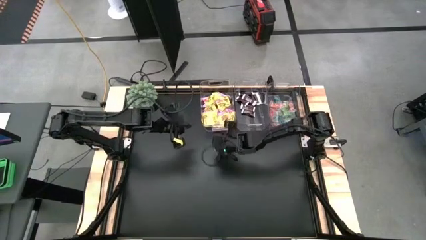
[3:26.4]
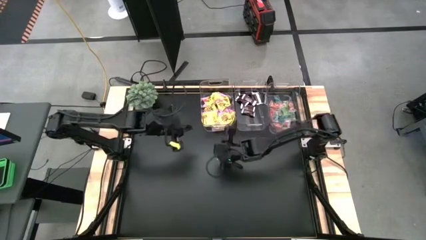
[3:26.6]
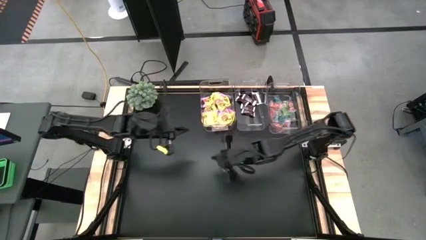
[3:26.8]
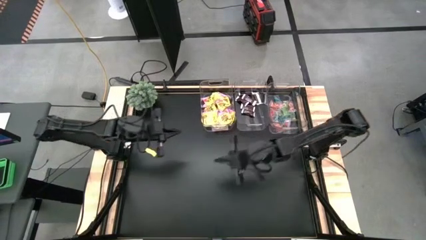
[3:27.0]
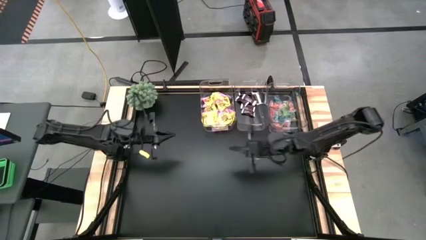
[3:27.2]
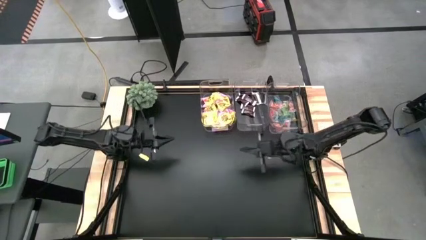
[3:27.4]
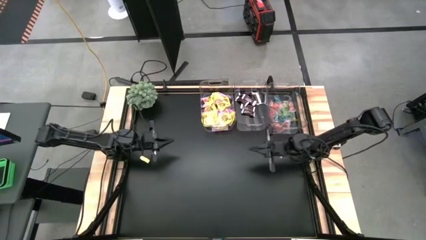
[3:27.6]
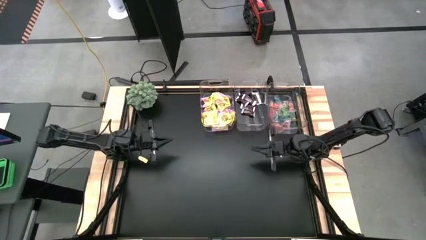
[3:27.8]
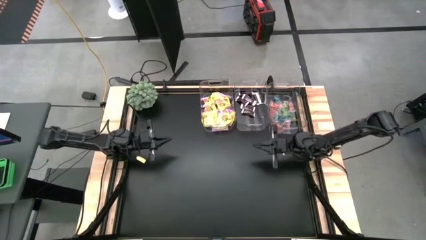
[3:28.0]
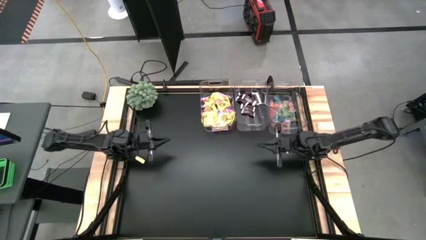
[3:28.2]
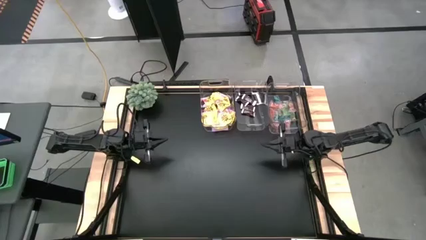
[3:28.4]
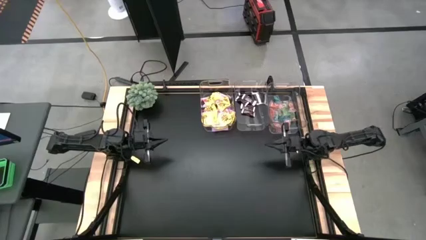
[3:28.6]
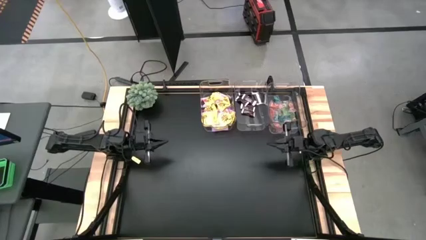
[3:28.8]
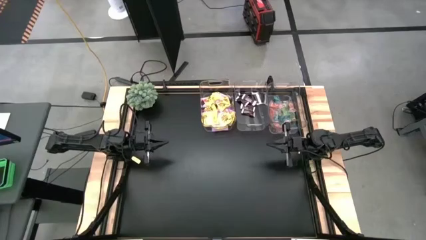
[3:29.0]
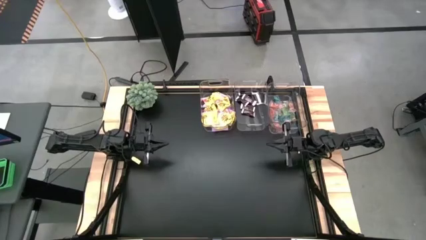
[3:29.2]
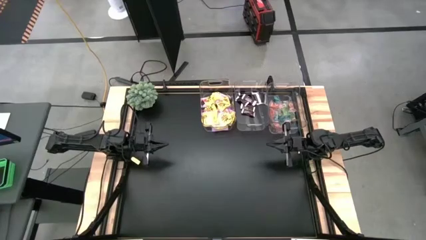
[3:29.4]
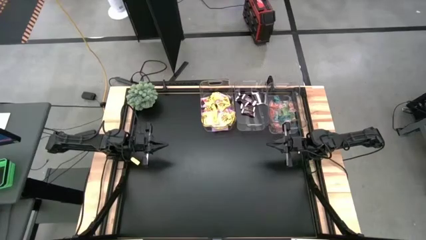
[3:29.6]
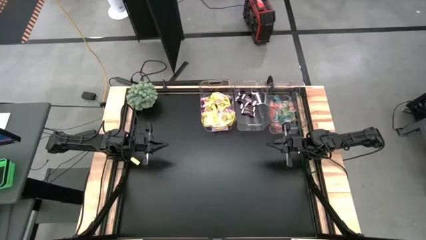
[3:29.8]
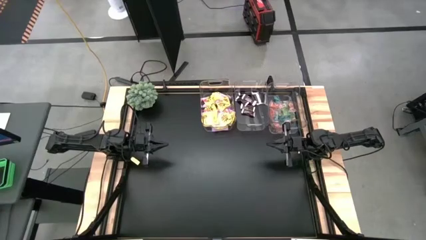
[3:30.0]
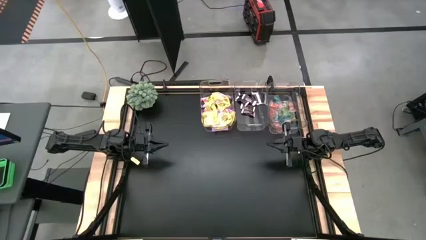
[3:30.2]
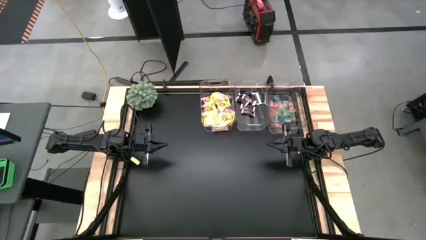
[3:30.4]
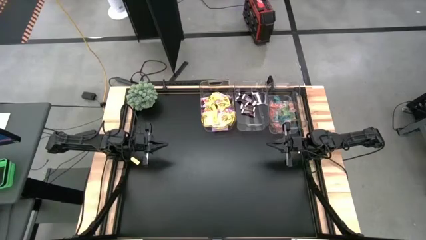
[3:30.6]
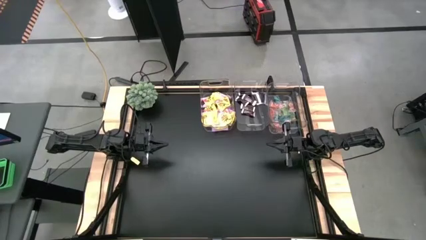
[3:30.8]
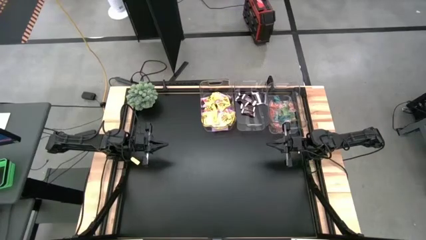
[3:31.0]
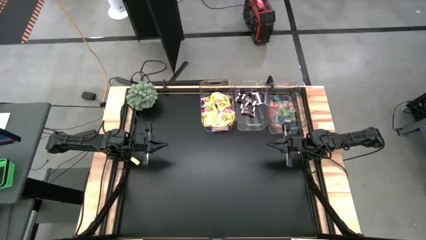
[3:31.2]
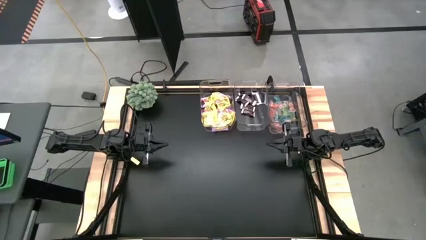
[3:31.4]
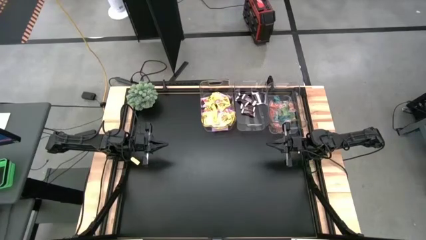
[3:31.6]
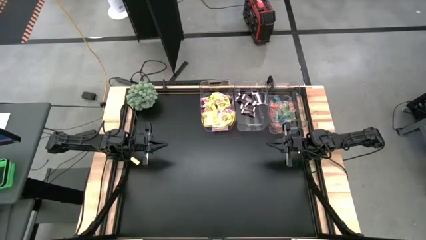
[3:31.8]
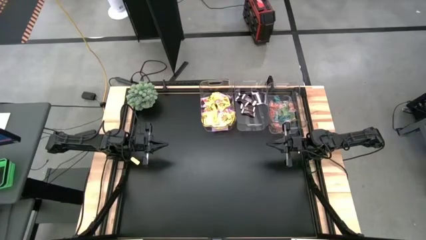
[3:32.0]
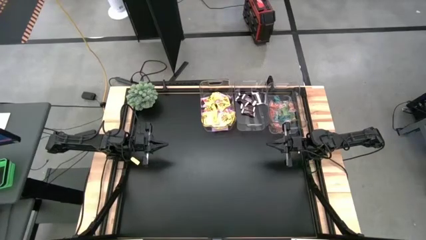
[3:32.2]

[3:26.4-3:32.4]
Task: Sort candy
Return to Home Position

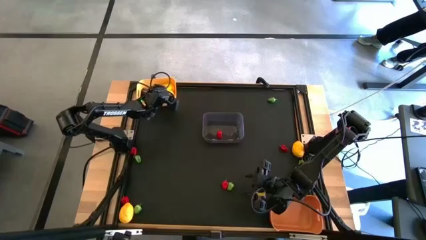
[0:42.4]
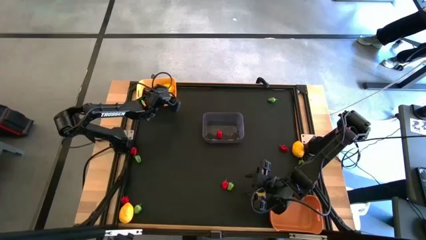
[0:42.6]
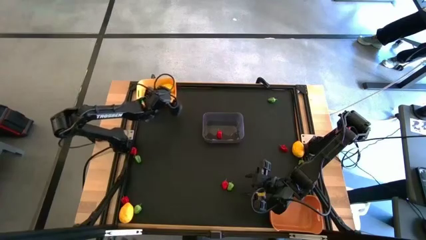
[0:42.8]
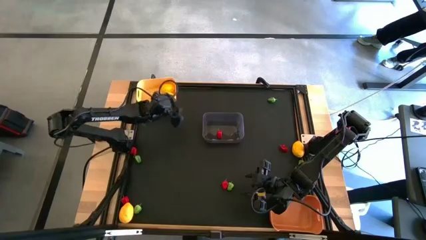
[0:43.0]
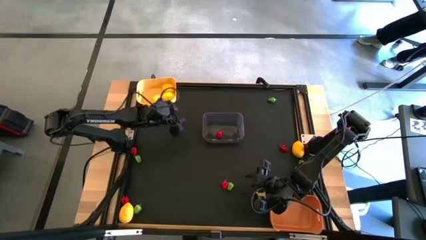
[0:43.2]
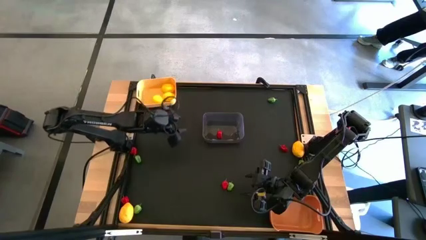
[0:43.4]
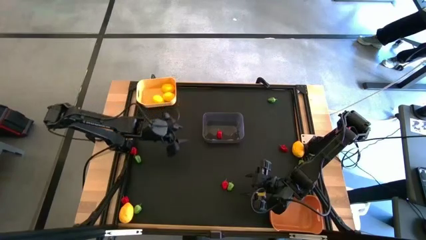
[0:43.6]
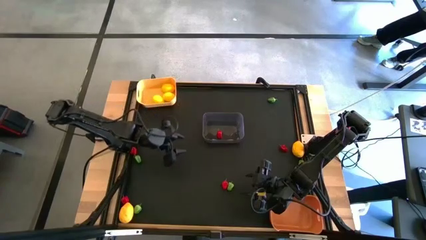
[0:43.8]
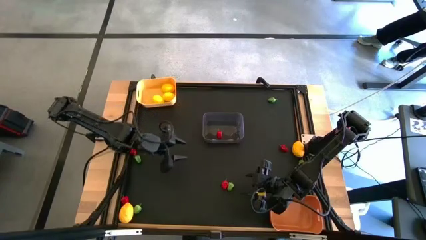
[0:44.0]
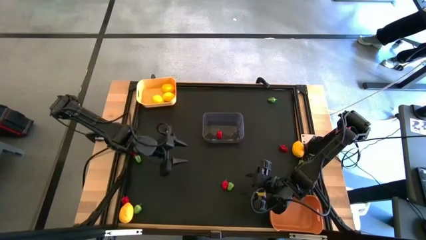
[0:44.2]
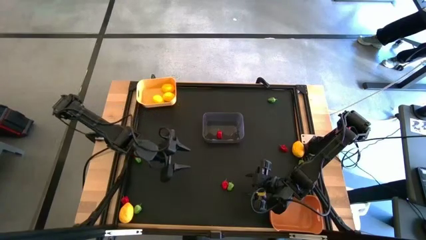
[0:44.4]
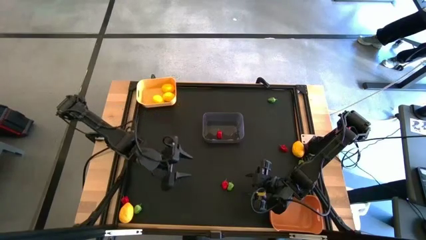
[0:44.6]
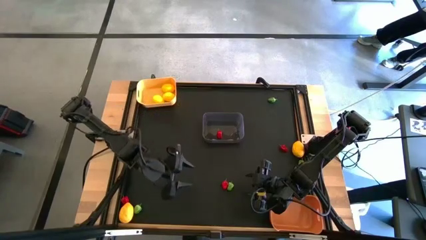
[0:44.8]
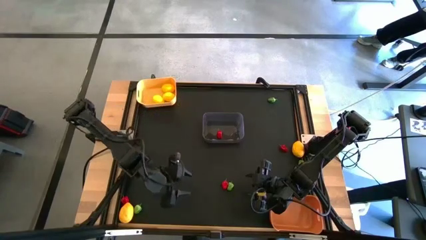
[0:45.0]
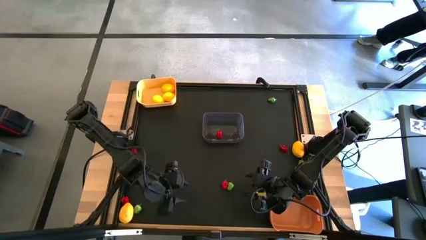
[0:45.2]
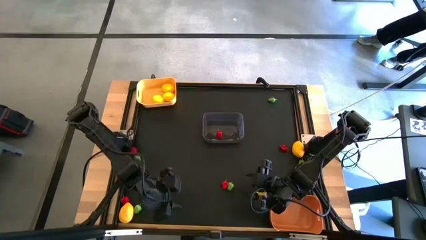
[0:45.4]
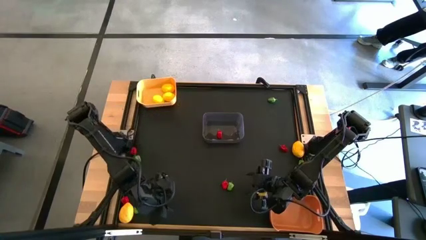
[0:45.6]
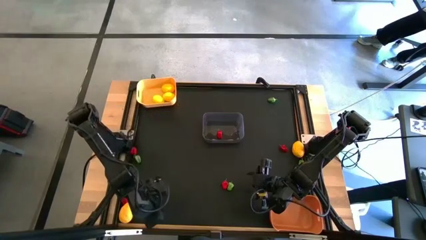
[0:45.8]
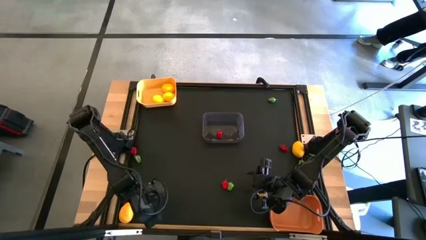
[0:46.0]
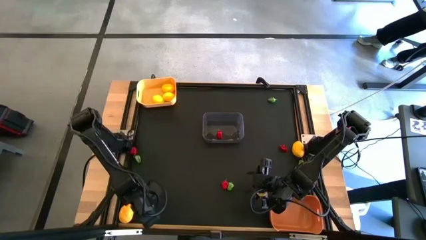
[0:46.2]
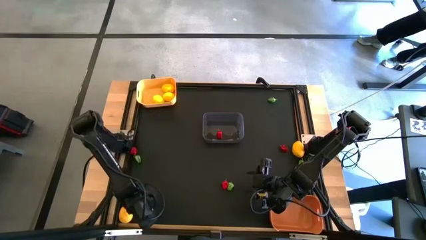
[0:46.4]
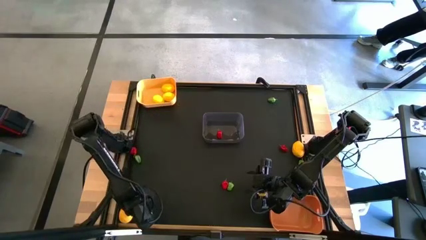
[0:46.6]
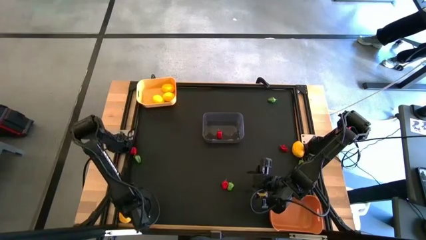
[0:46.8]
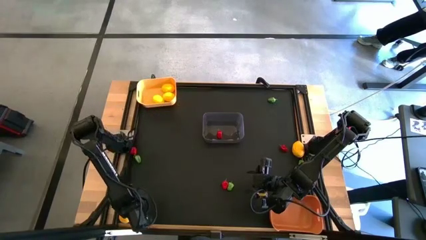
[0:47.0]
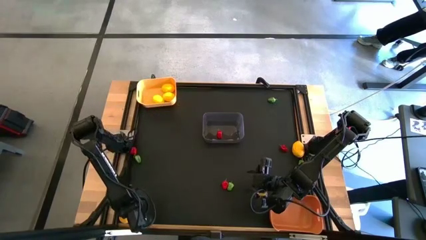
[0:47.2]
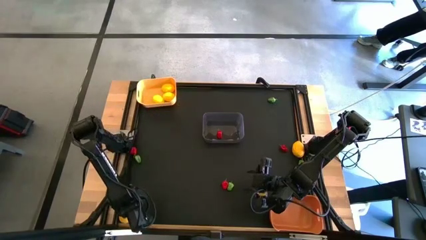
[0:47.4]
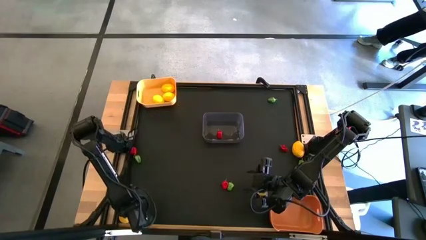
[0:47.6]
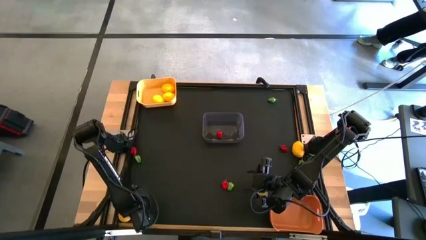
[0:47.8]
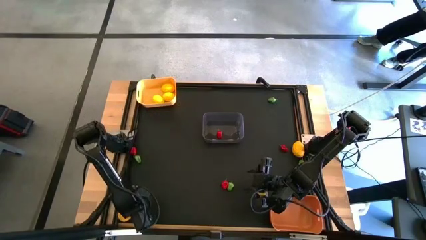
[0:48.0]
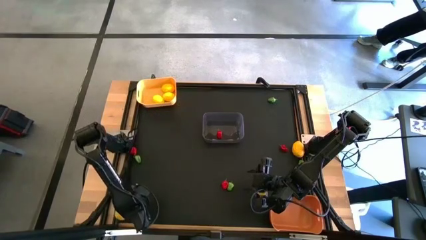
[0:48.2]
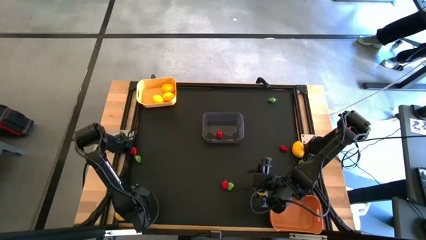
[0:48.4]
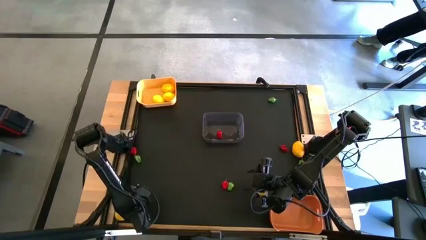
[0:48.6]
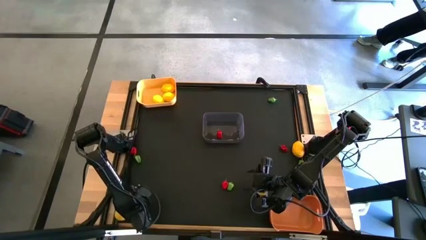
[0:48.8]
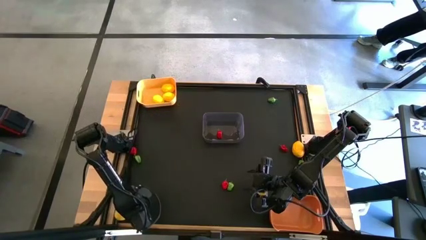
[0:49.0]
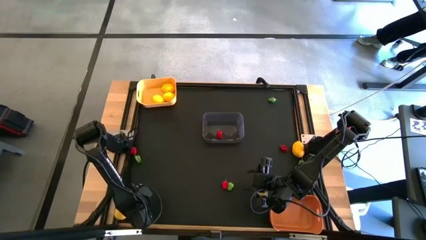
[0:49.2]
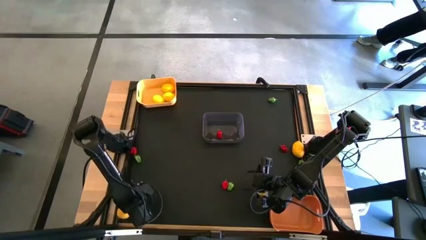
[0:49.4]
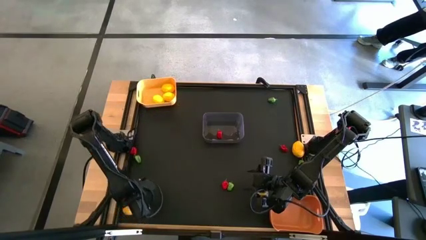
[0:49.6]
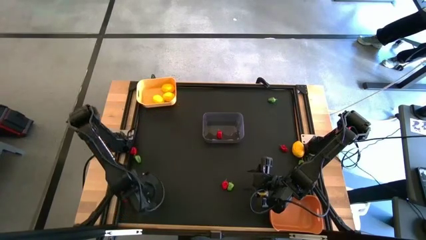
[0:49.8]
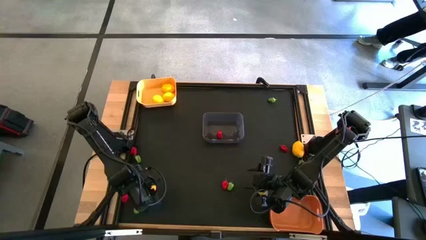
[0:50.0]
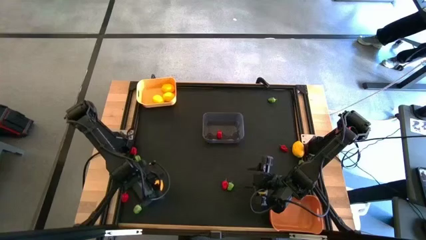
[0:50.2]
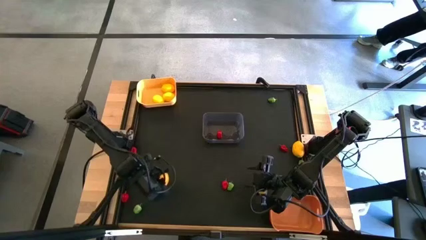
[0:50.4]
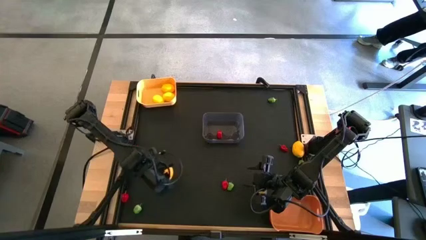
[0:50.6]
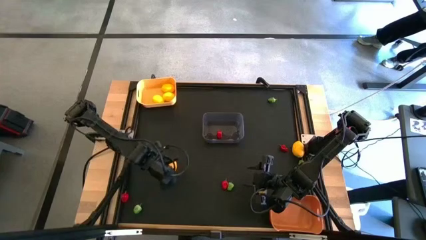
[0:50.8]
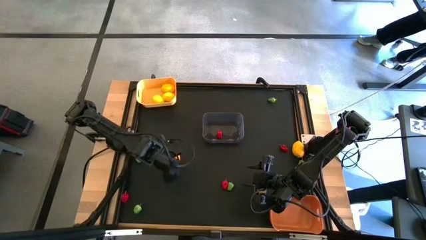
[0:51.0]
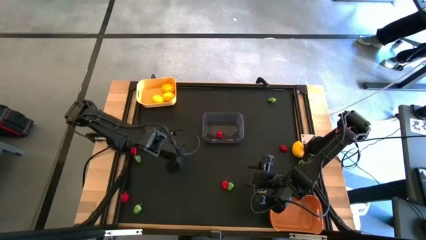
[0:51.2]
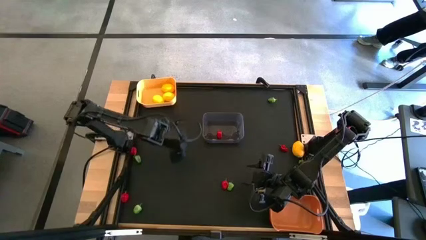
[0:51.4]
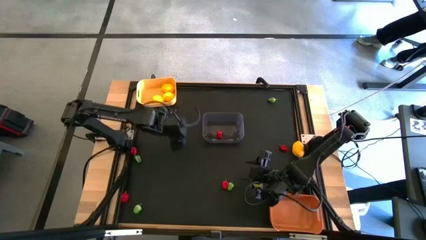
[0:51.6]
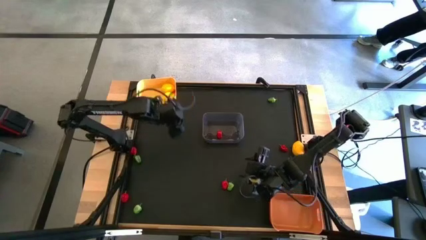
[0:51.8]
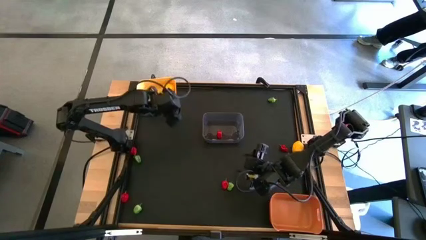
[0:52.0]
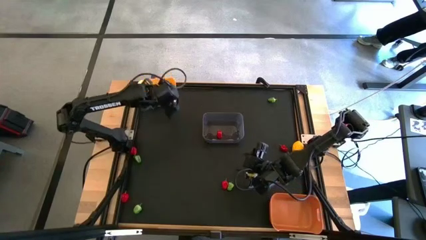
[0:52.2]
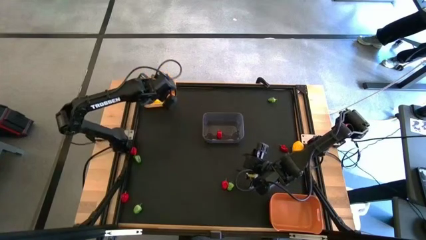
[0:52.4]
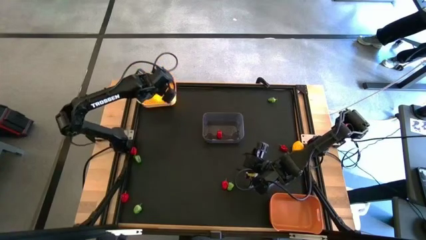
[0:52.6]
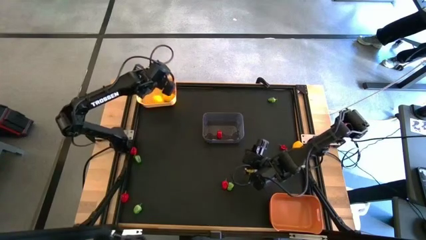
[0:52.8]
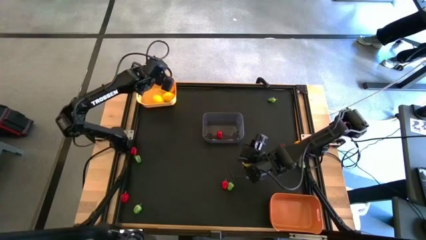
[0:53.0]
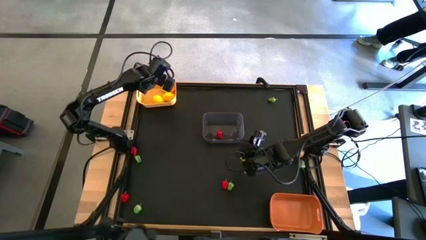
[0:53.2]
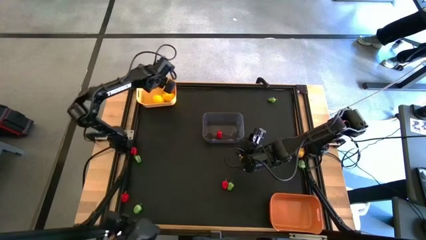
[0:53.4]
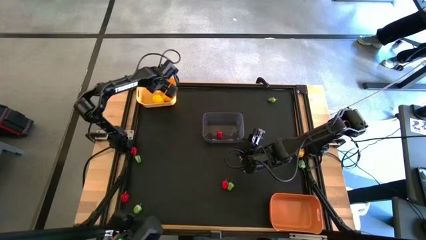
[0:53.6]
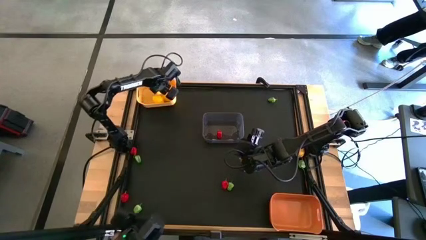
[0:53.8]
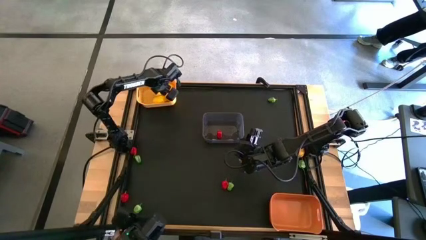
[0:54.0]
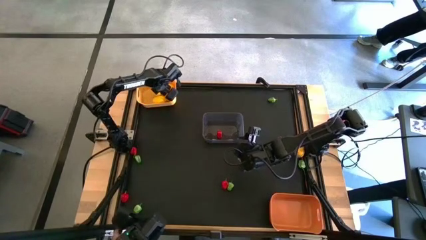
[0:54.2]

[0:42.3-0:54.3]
Task: Sort produce into baskets
Put the yellow lemon into the yellow bin
